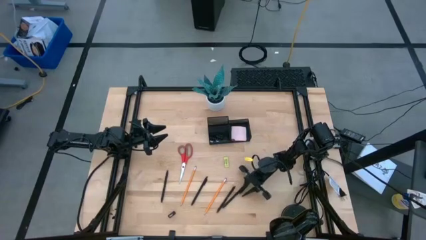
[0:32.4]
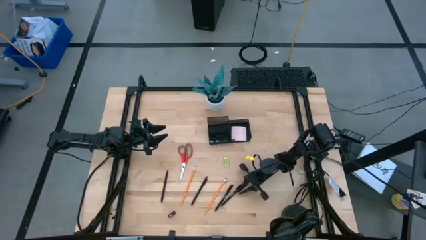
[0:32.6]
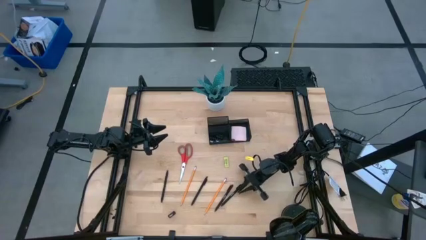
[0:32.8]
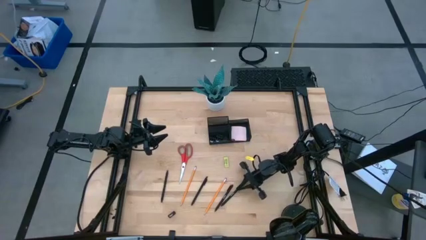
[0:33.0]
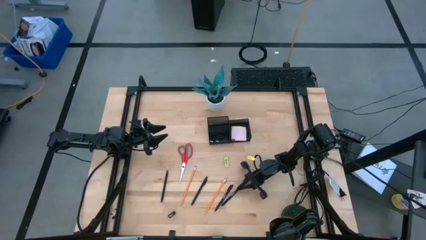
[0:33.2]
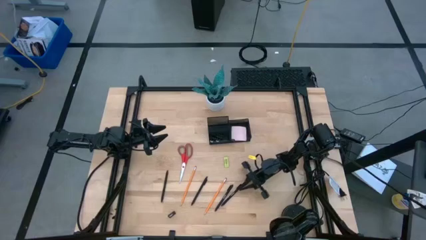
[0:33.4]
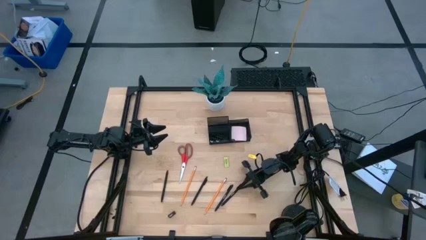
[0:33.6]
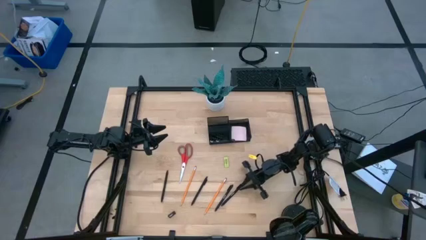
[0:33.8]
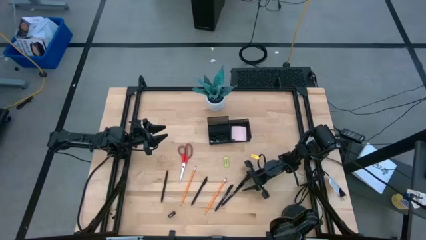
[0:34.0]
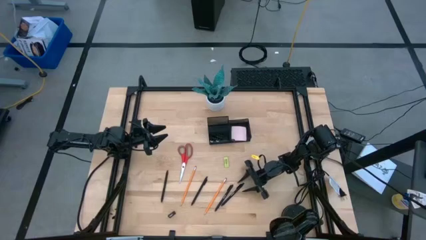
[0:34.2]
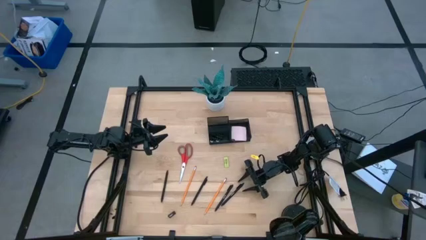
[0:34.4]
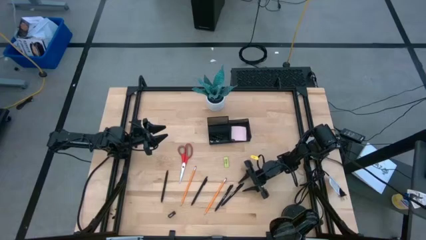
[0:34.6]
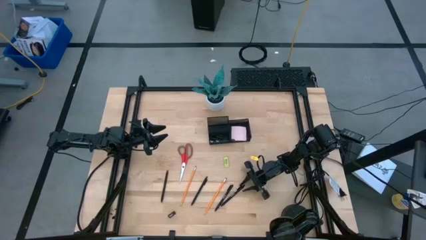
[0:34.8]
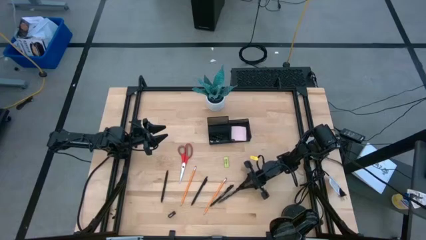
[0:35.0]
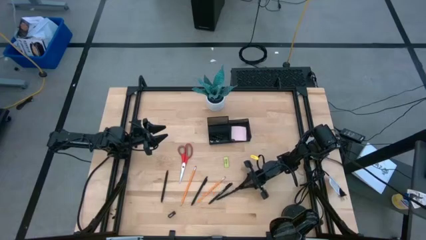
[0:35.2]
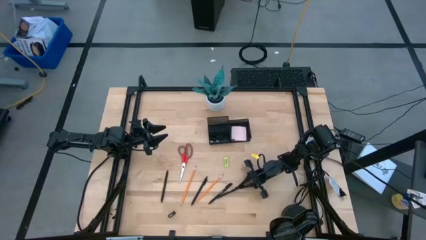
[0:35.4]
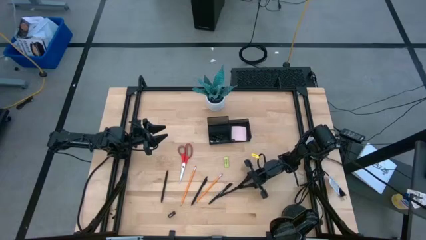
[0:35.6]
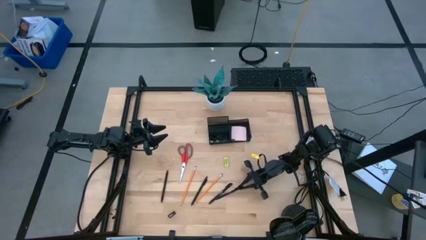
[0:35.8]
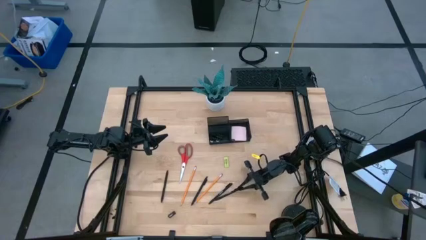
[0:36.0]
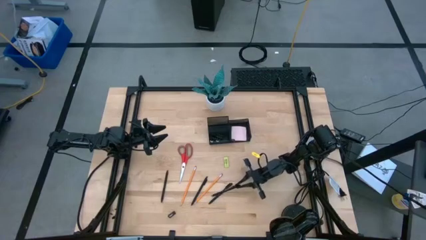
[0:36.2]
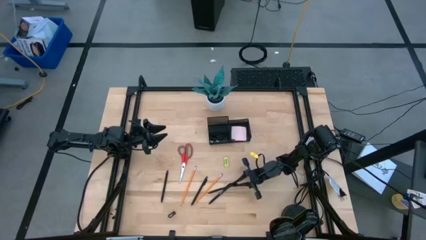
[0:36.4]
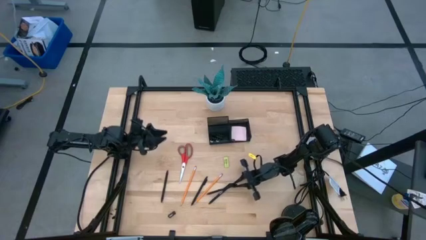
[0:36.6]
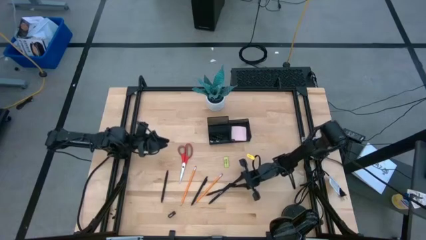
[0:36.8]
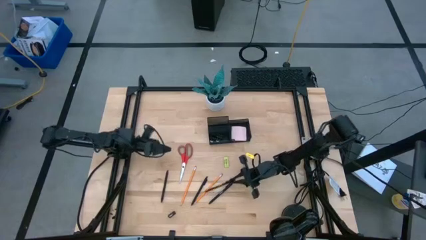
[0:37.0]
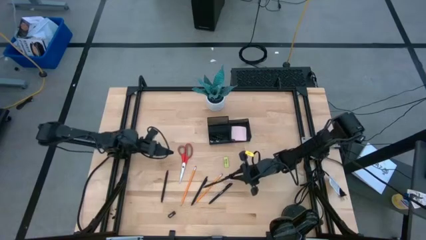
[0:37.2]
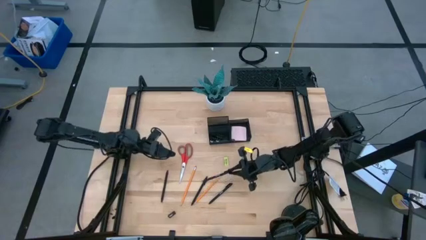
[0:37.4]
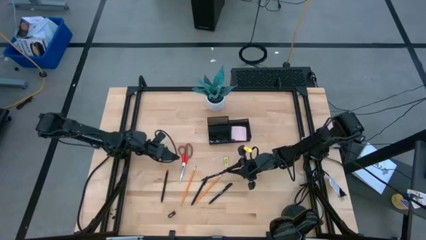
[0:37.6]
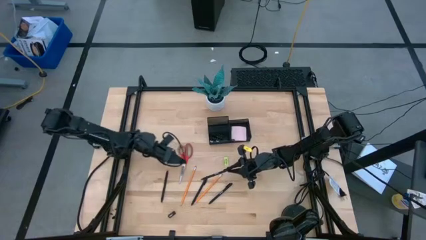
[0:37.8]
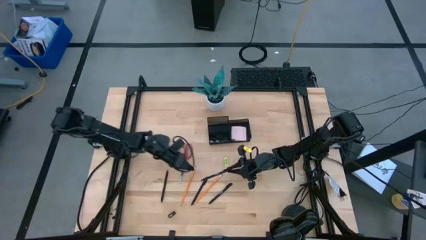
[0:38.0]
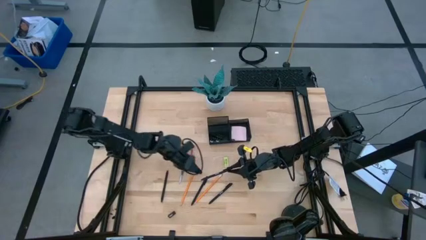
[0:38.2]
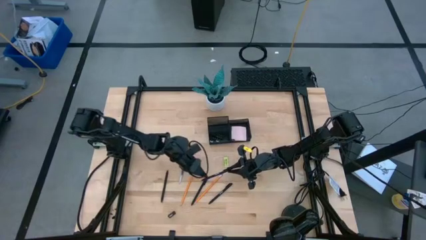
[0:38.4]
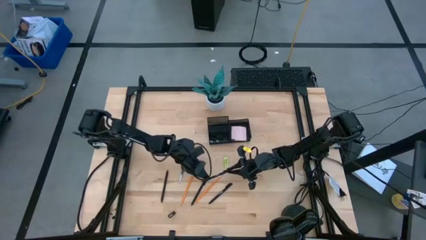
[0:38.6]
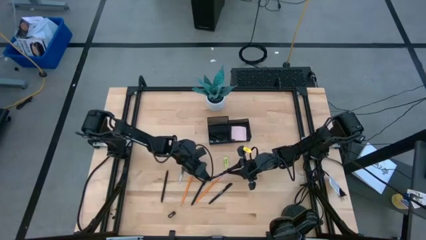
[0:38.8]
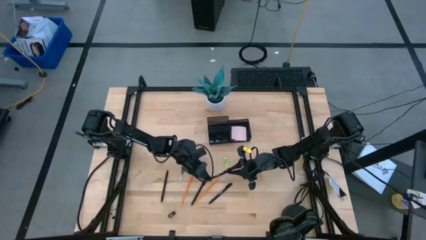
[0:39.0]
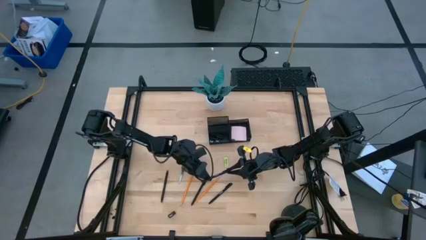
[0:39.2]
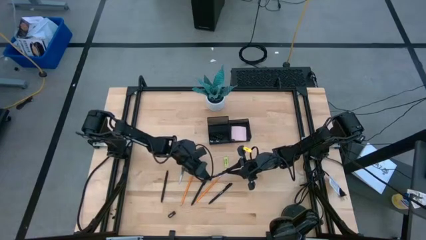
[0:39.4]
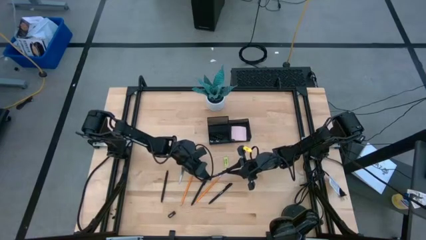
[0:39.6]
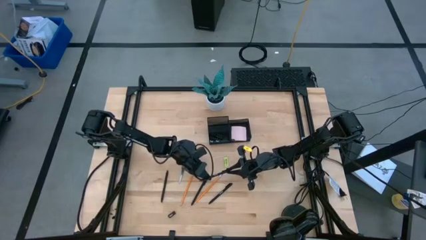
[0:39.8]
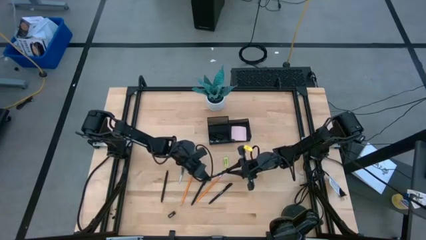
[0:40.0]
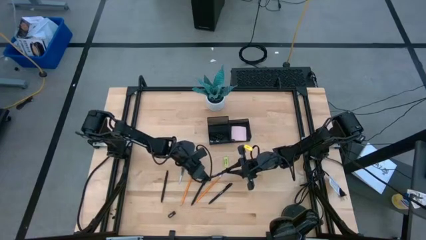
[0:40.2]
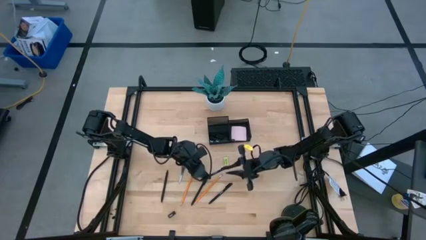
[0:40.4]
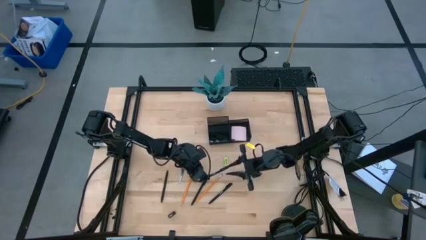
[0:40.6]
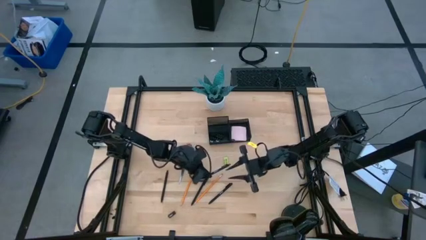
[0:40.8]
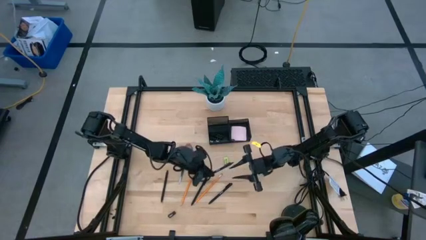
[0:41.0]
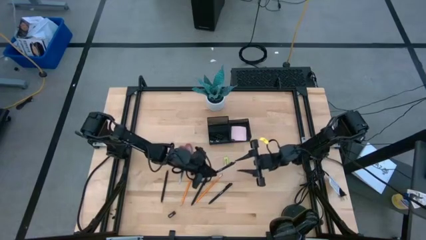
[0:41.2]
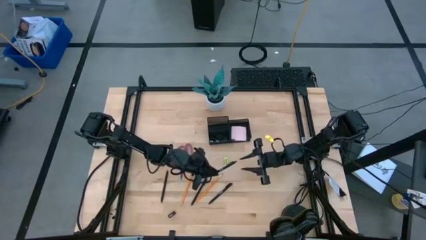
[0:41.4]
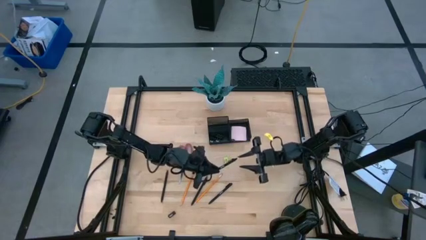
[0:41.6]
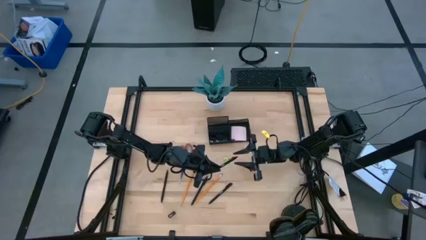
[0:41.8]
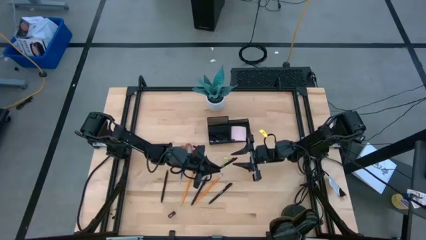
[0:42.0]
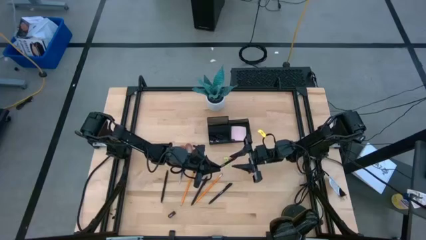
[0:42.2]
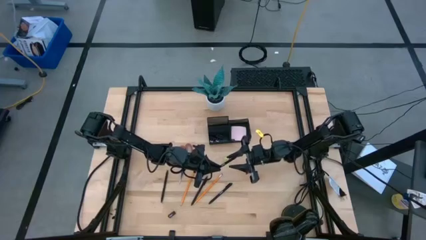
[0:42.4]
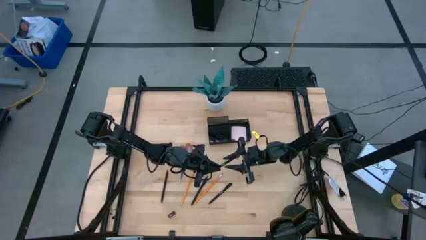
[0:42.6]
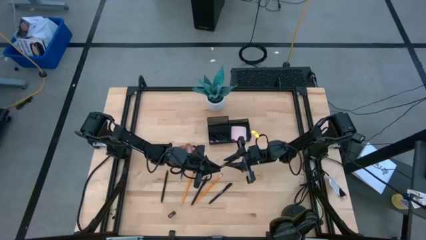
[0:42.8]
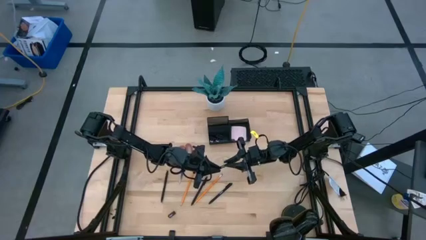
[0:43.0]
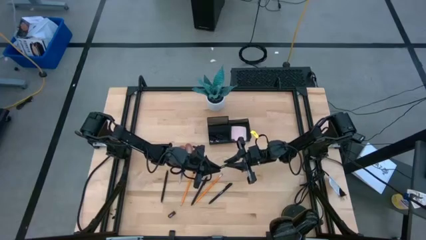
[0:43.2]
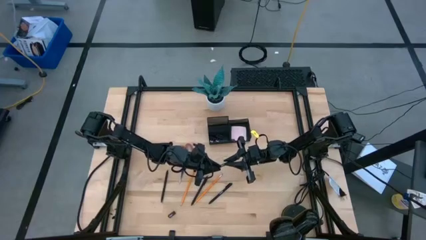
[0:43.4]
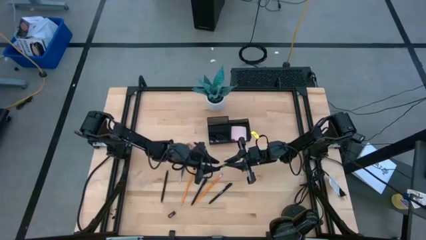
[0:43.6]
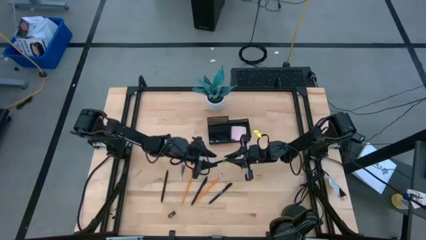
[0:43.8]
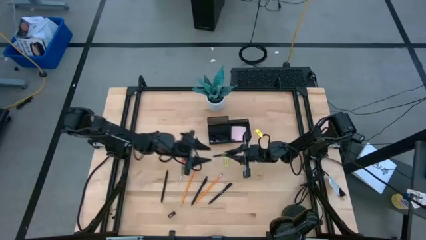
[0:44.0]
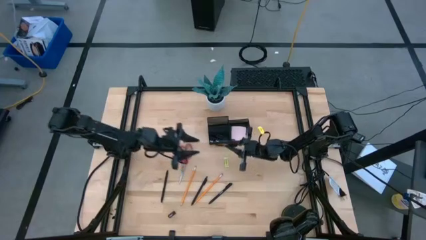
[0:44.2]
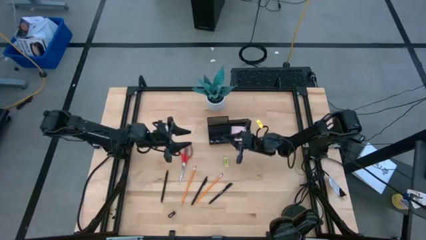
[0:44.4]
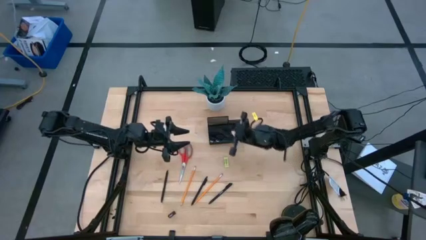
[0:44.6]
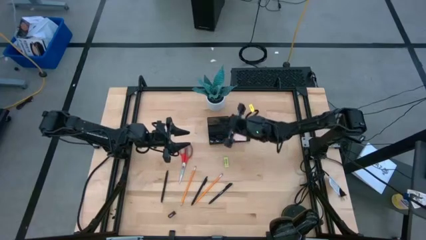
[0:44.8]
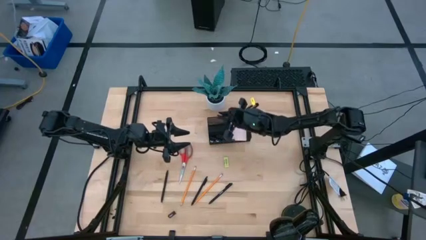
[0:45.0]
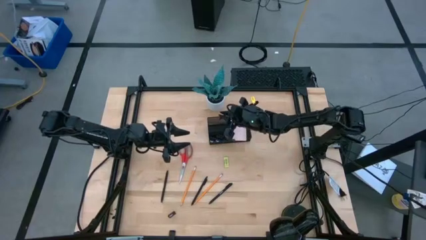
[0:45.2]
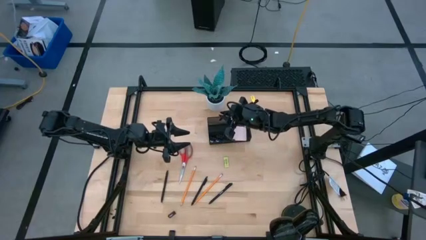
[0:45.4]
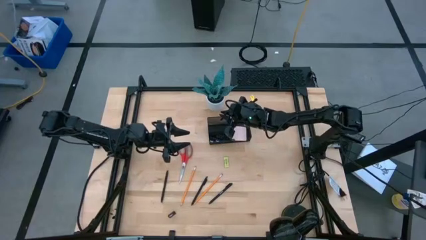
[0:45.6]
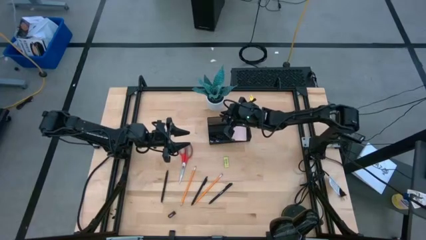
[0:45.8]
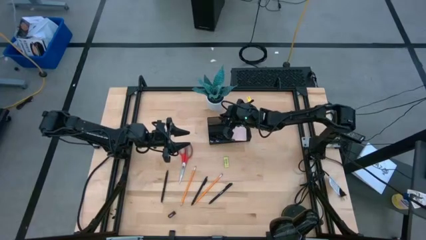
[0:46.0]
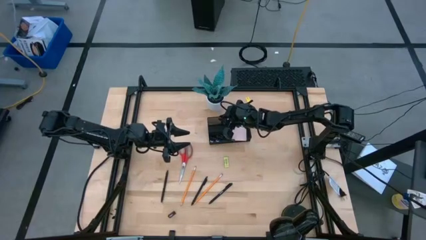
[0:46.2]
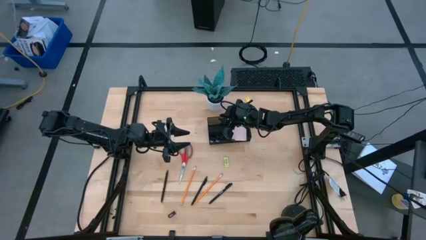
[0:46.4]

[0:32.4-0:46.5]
Task: Pick and place office supplies into organizer
Put the black pen into the black desk organizer
